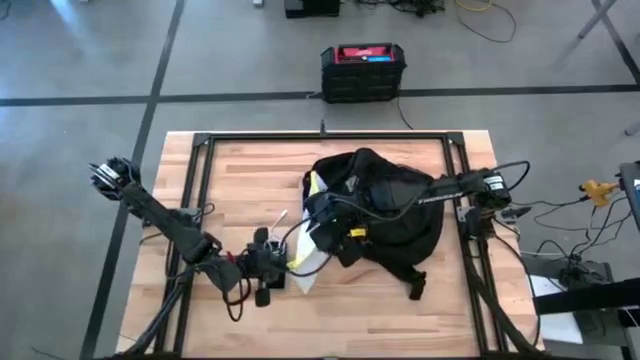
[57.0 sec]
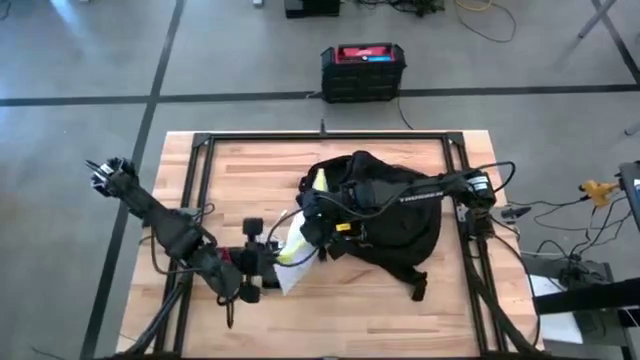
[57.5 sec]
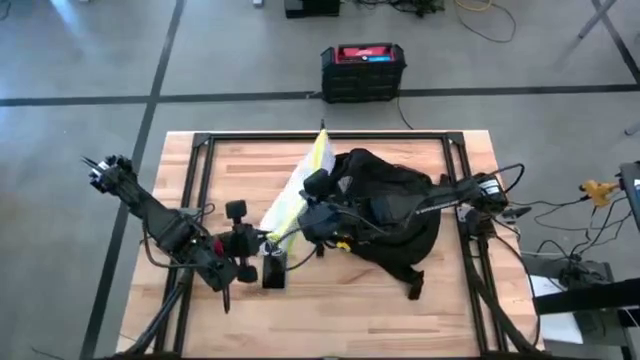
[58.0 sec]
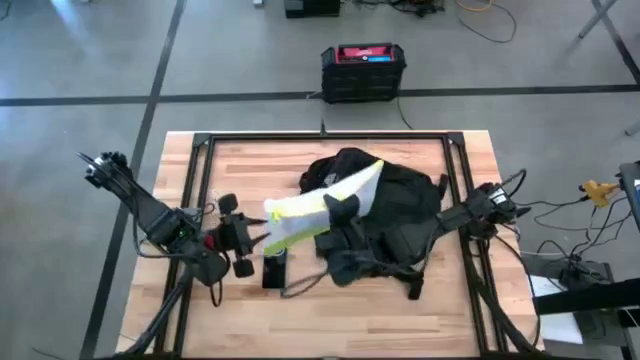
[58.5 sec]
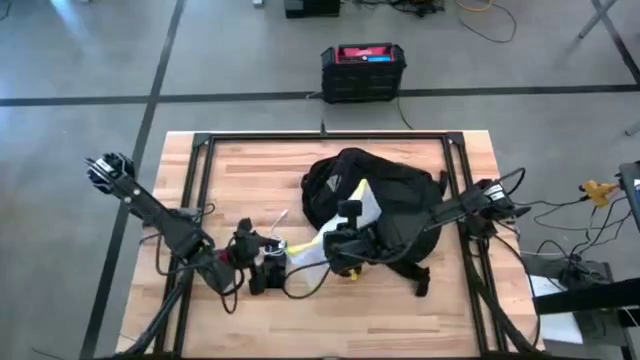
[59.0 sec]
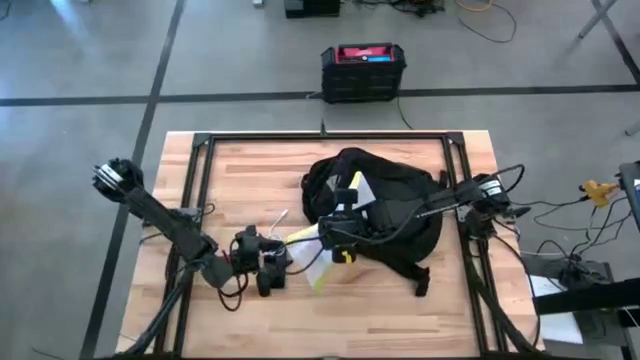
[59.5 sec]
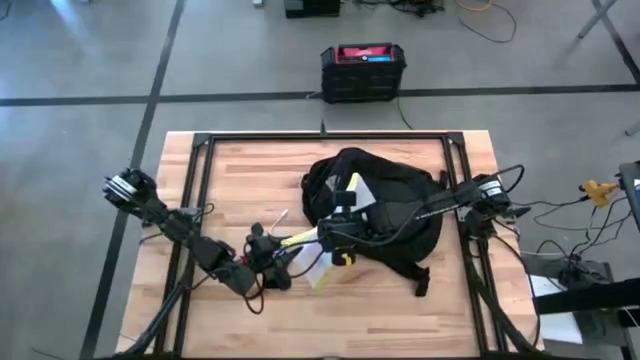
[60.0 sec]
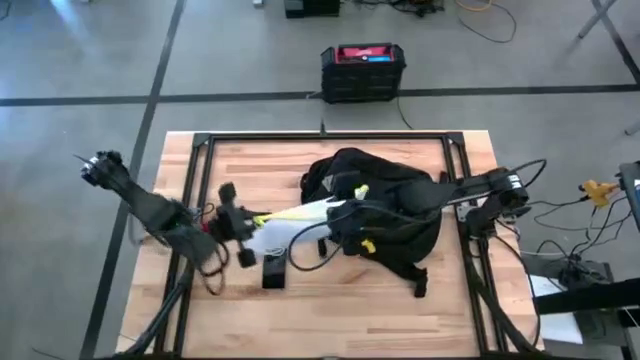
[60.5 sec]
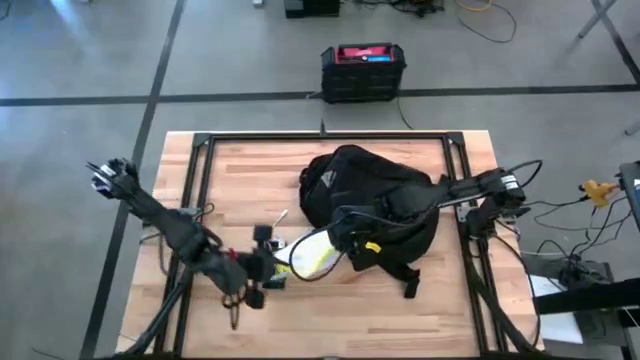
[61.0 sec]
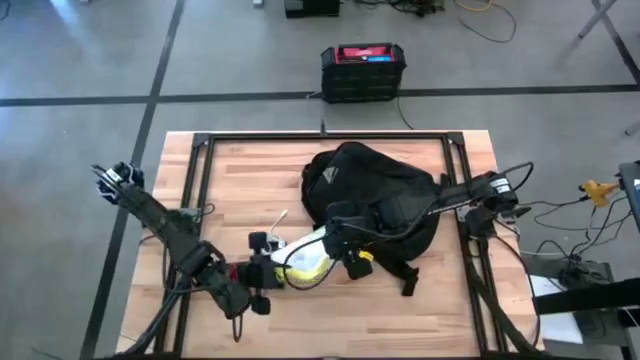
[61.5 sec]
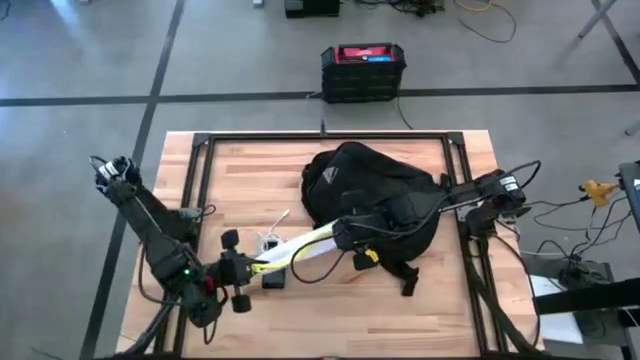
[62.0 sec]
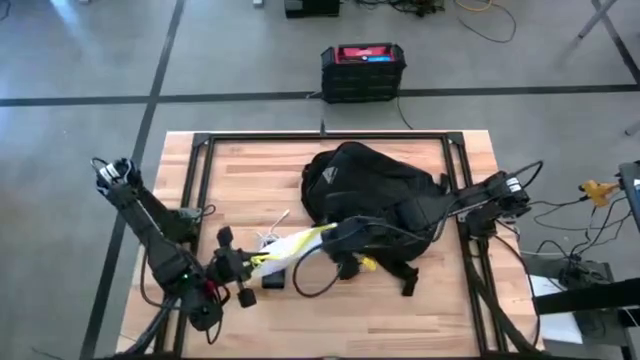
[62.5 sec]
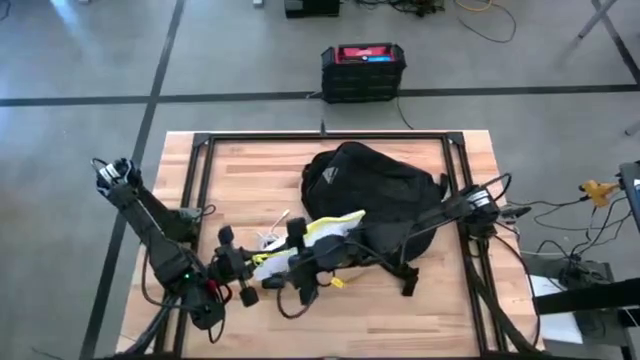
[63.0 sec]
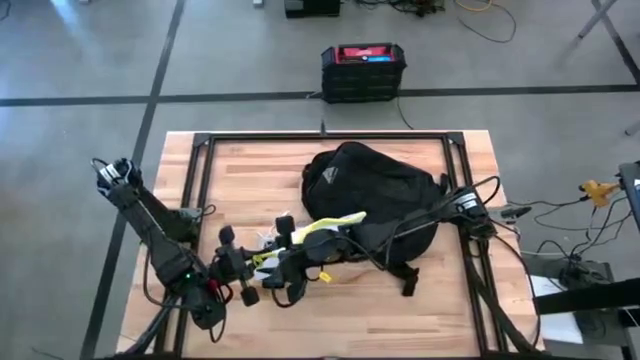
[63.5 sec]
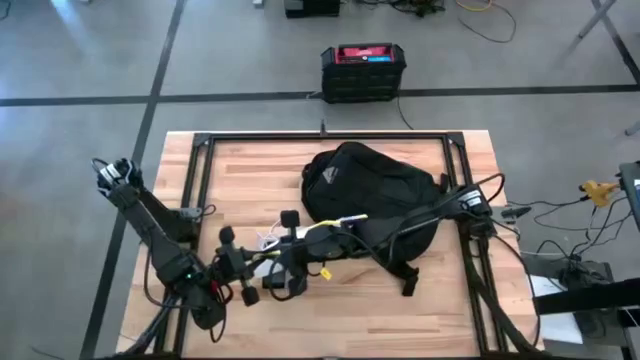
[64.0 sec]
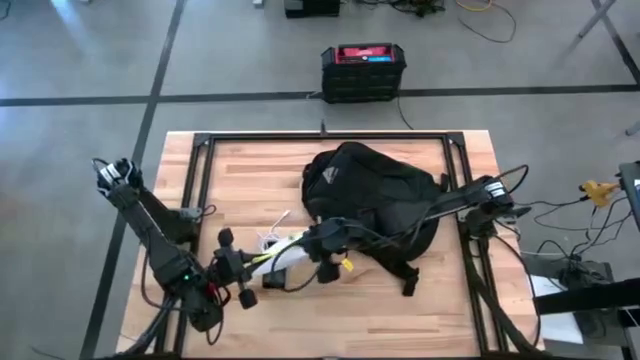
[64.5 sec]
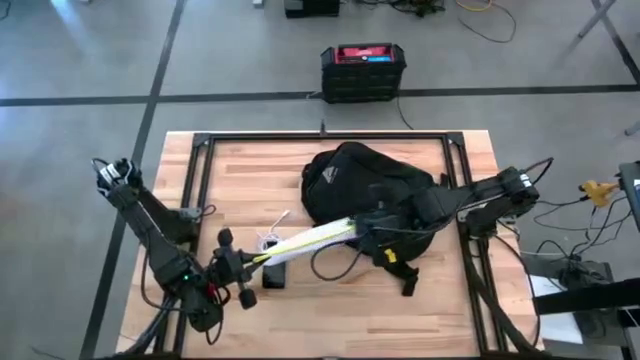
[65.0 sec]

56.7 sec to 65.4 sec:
Task: Unpack backpack
Open the yellow green zip bag

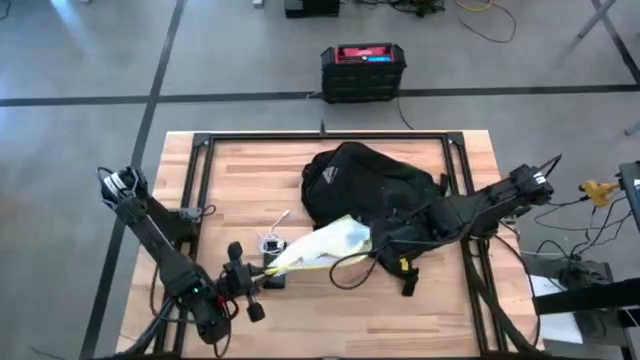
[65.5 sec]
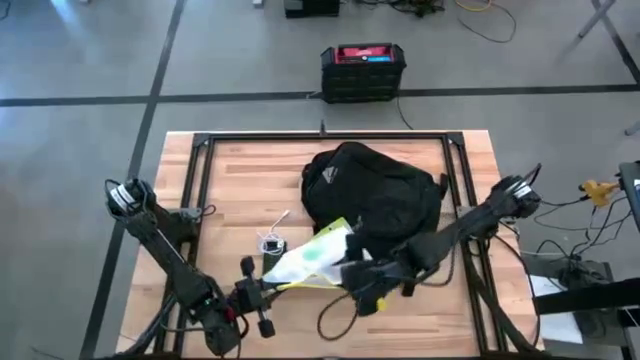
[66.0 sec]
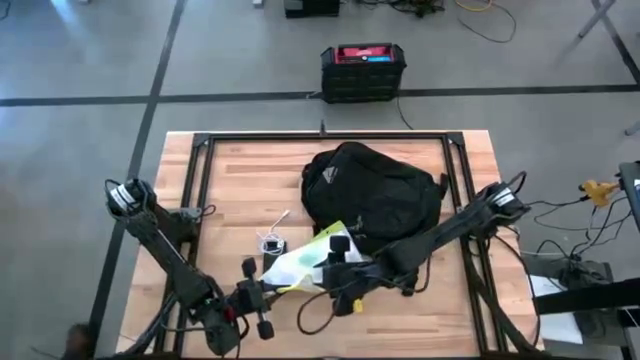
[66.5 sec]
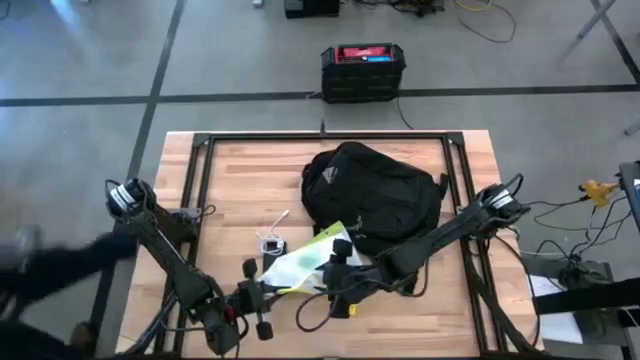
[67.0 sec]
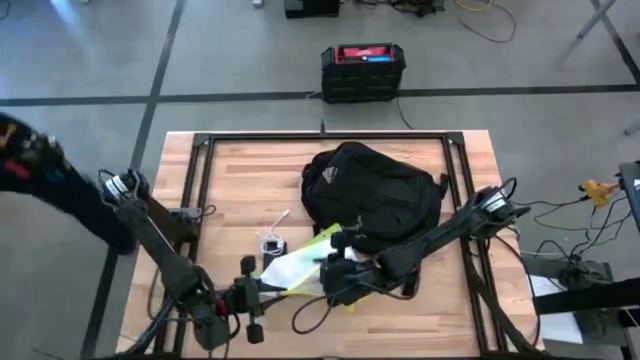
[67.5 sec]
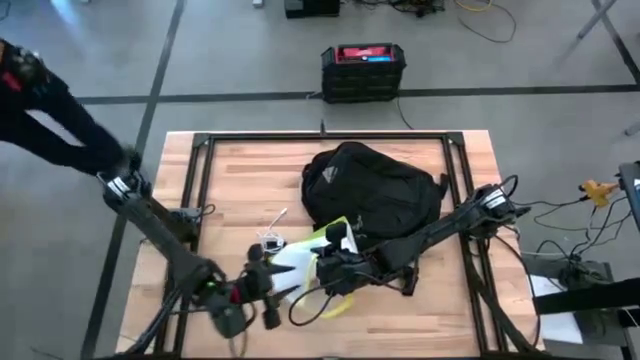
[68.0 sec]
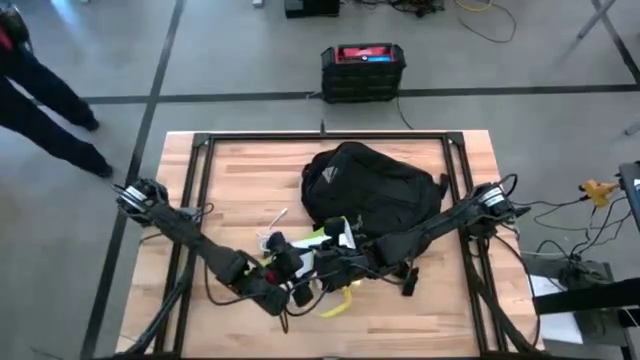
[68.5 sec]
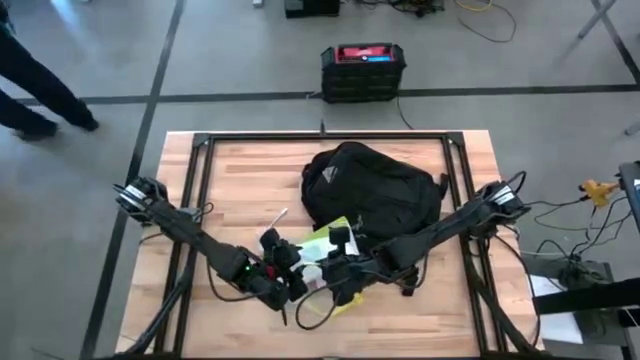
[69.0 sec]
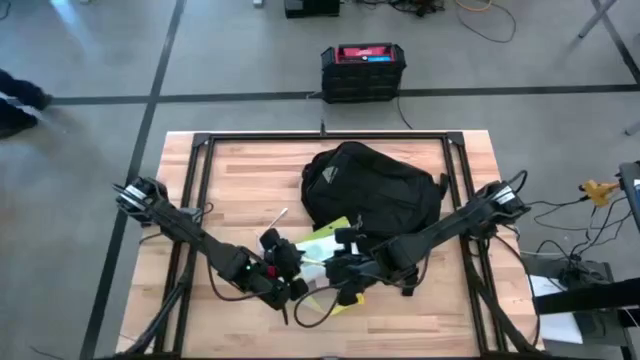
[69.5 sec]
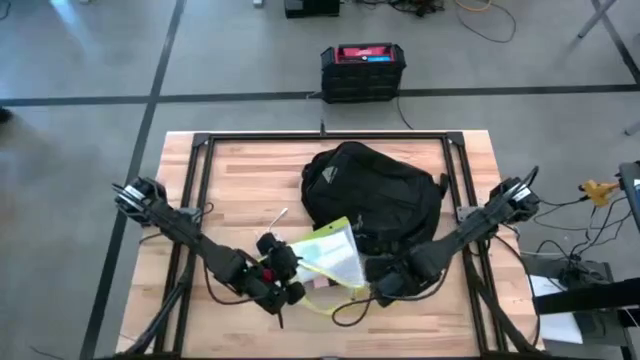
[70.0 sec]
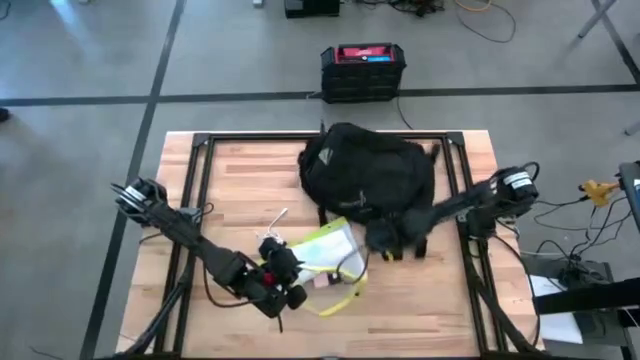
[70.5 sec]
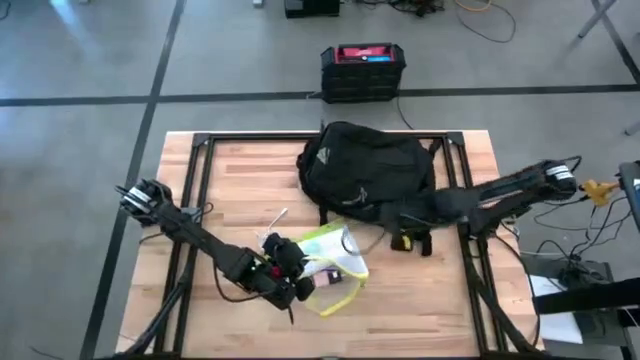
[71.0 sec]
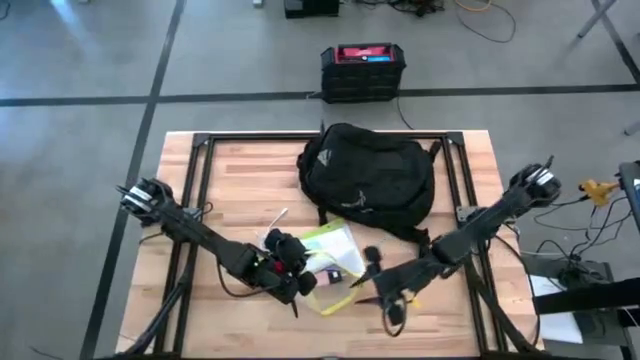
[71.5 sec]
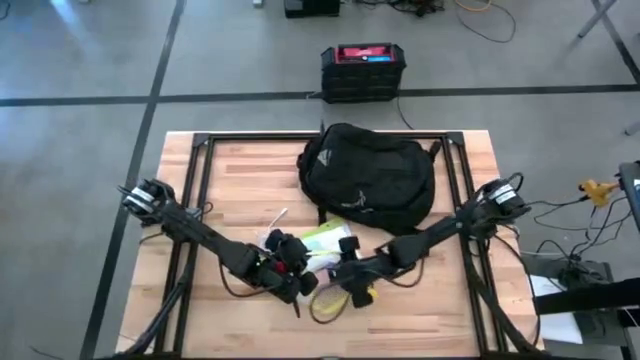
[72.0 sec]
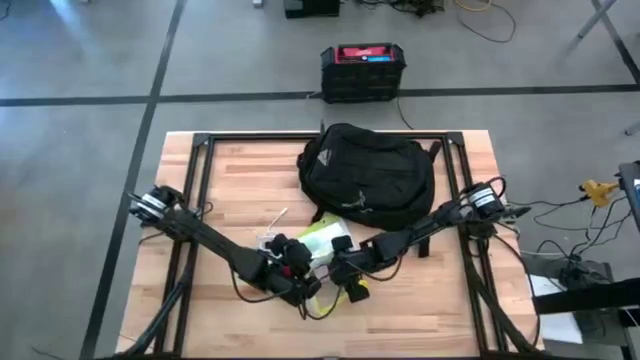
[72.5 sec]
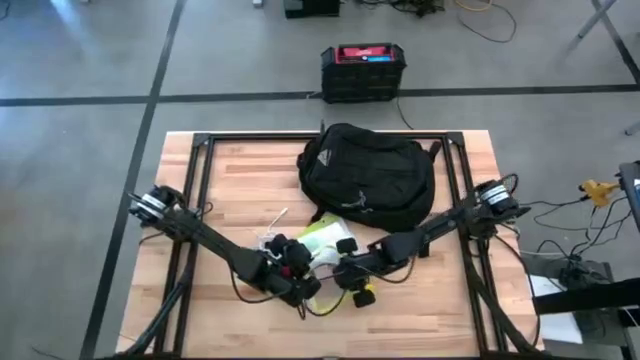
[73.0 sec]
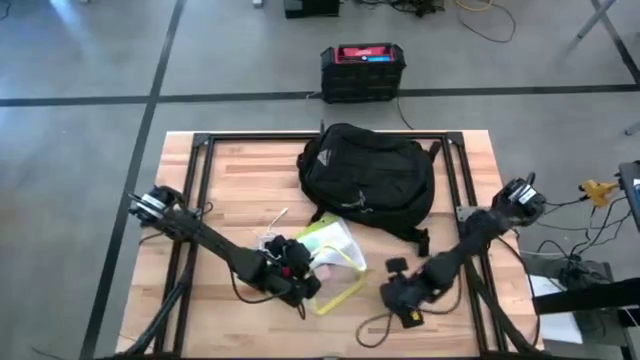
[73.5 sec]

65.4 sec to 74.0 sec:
Remove the black charger adapter from the yellow green zip bag

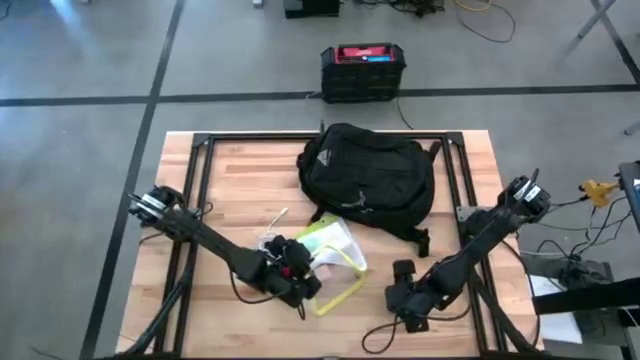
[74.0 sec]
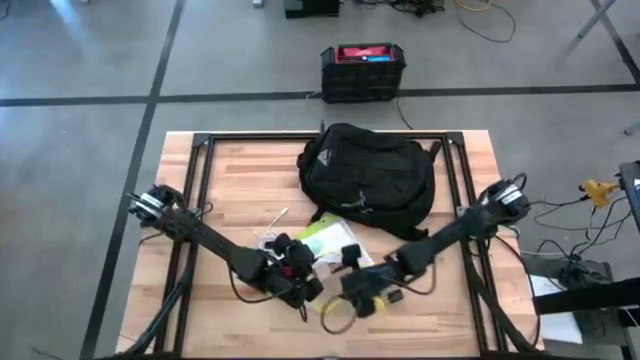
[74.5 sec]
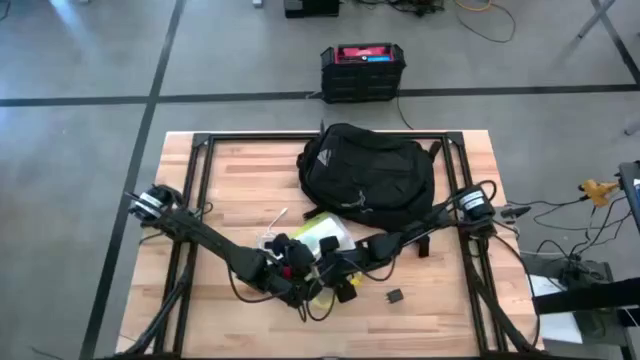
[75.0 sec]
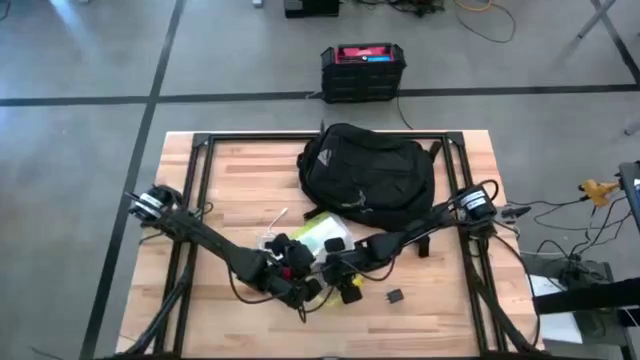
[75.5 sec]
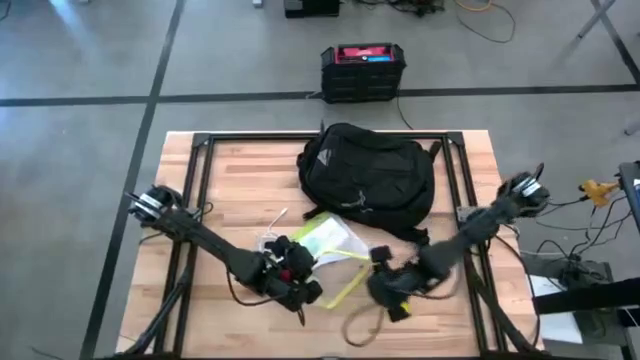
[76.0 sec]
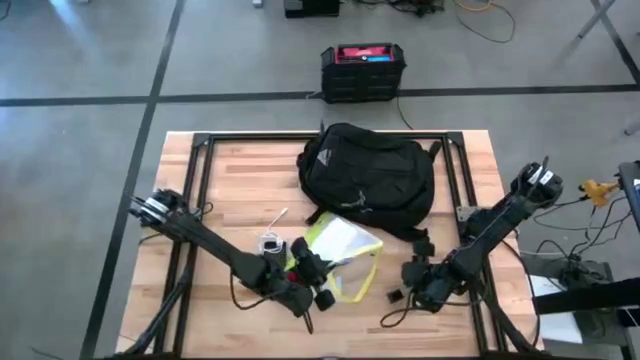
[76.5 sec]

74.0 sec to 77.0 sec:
Remove the pink charger adapter from the yellow green zip bag

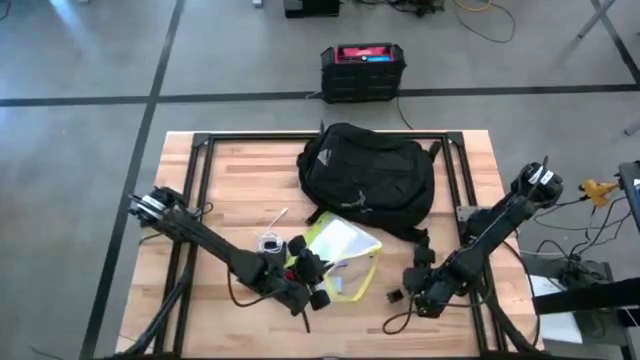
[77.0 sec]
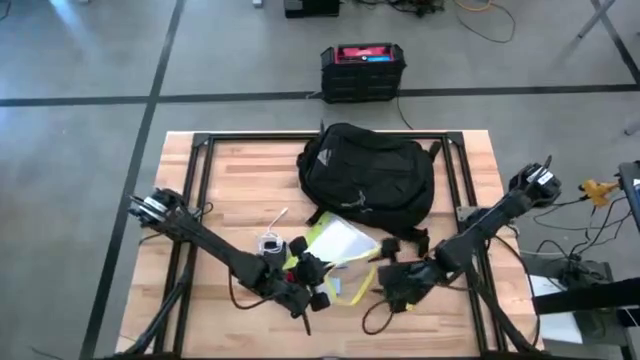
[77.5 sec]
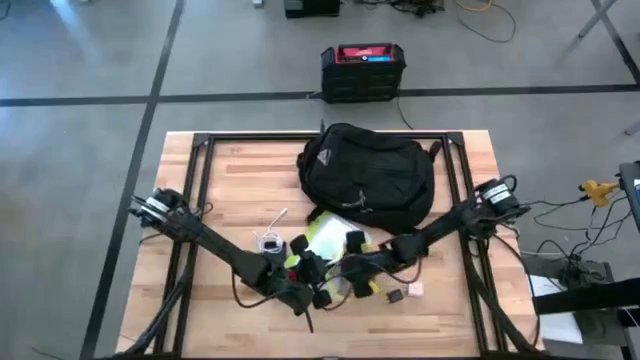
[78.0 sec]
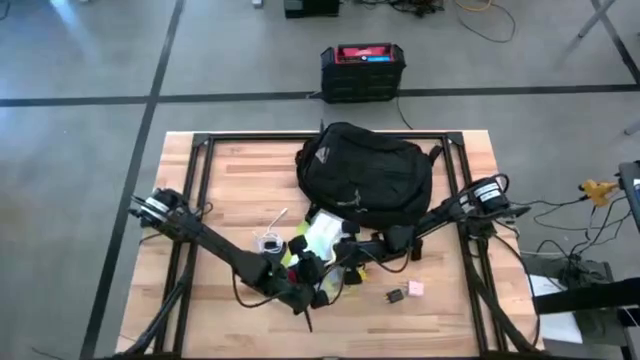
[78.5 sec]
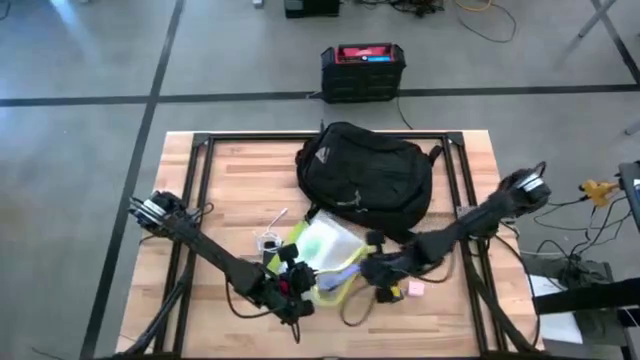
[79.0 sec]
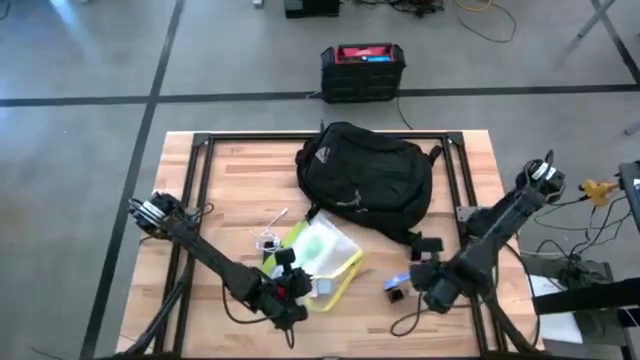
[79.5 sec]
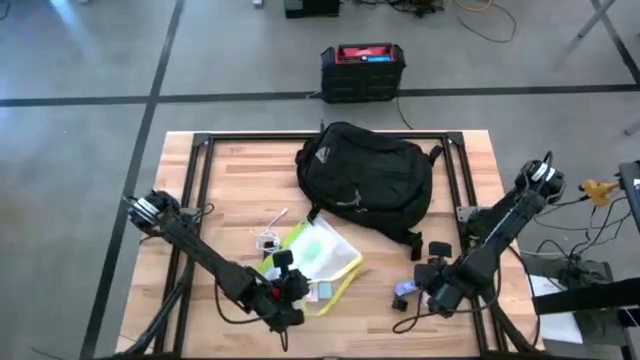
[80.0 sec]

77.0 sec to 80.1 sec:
Remove the violet chocolate bar from the yellow green zip bag
